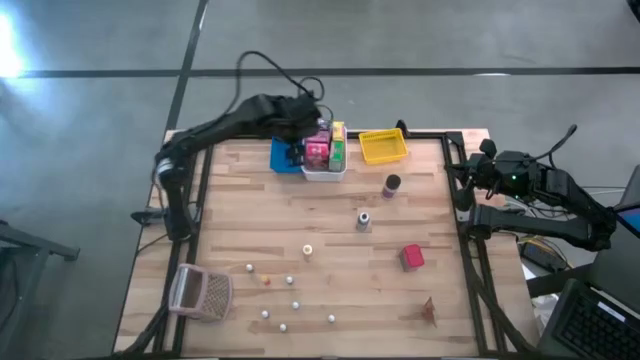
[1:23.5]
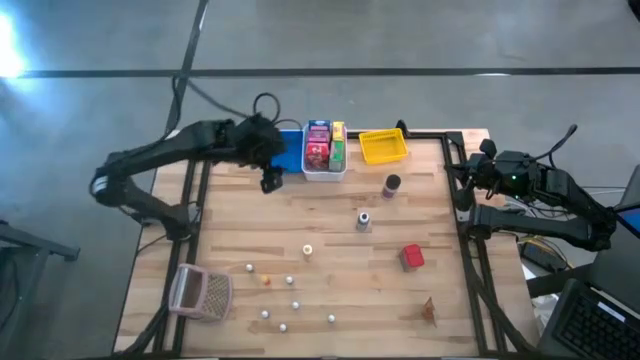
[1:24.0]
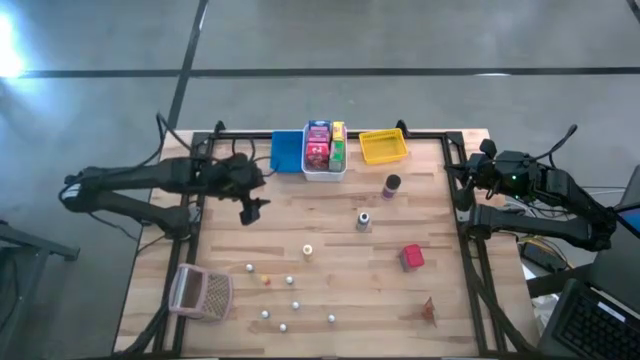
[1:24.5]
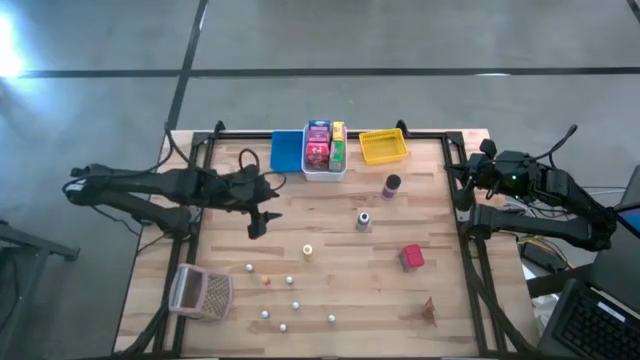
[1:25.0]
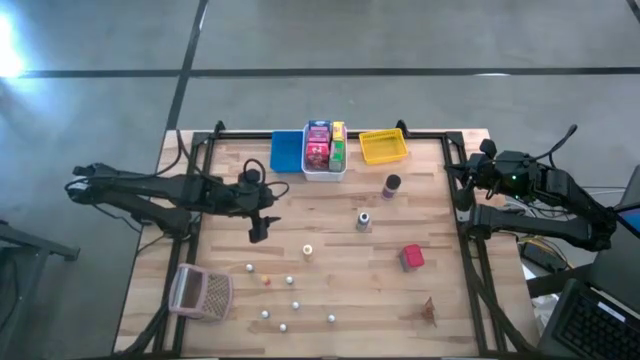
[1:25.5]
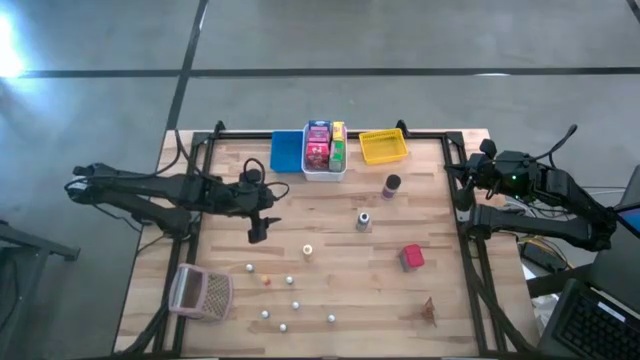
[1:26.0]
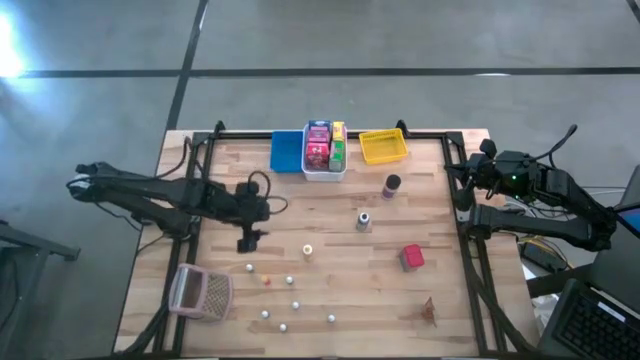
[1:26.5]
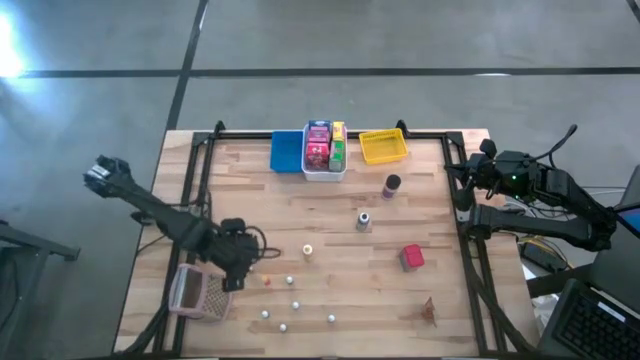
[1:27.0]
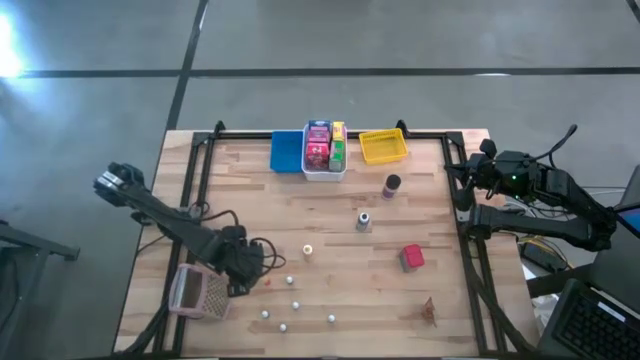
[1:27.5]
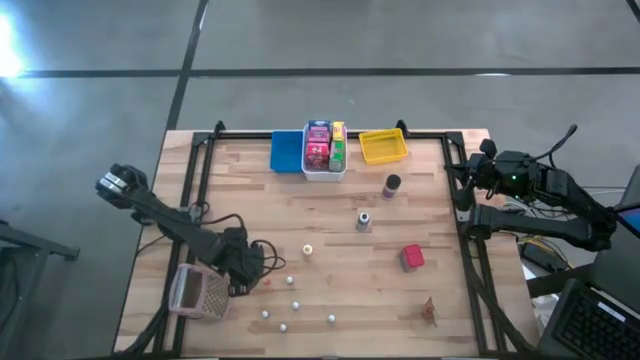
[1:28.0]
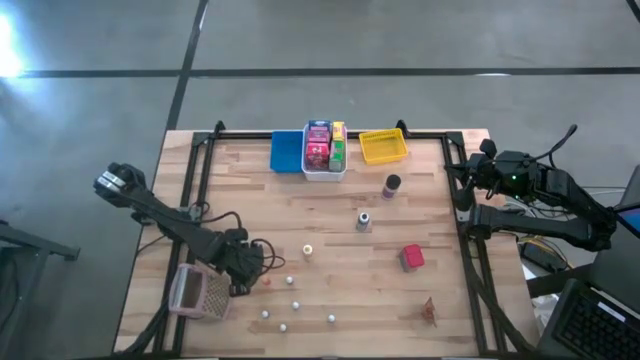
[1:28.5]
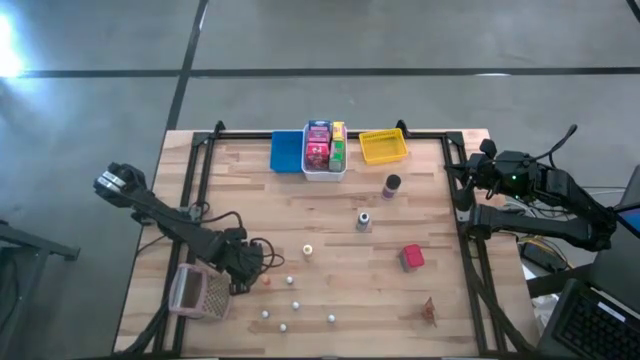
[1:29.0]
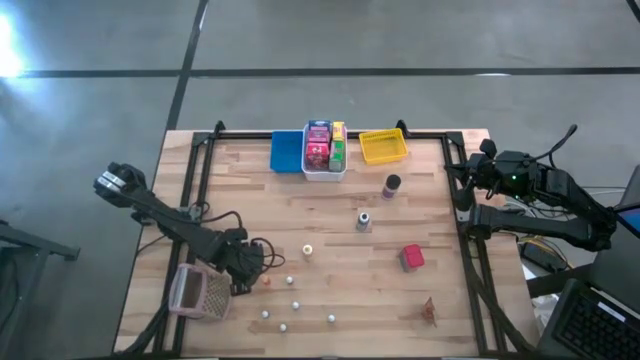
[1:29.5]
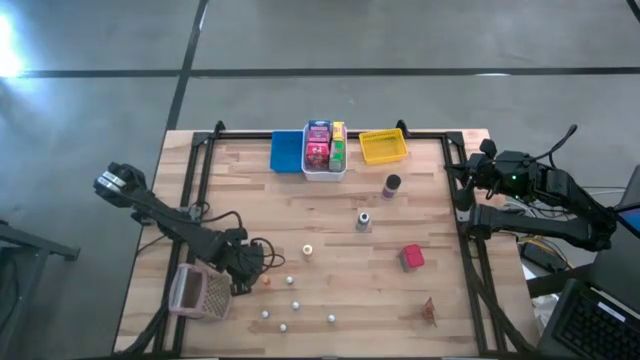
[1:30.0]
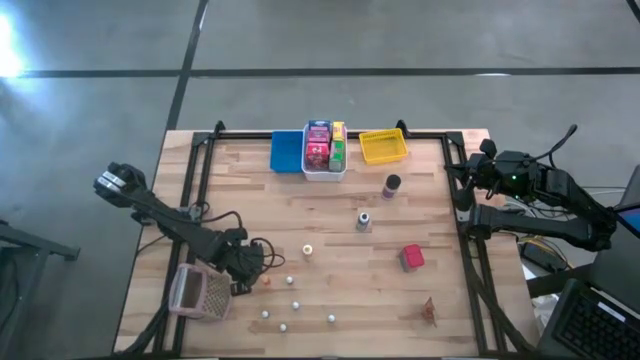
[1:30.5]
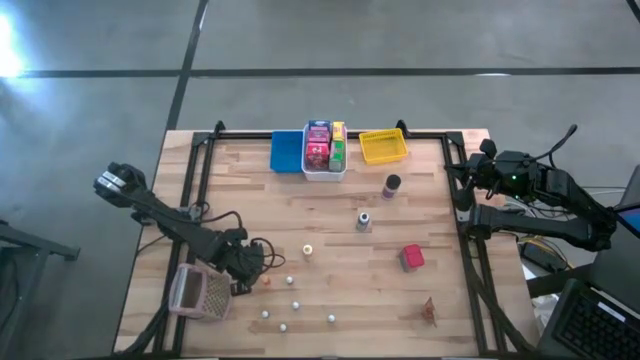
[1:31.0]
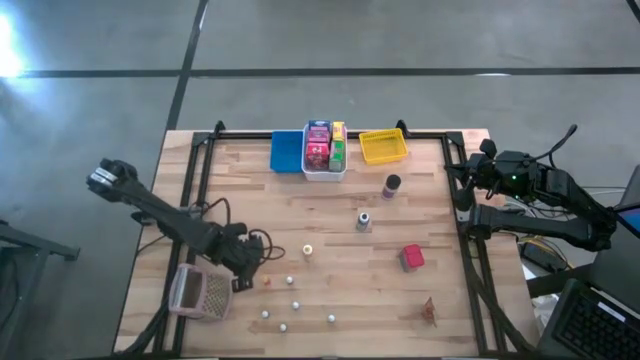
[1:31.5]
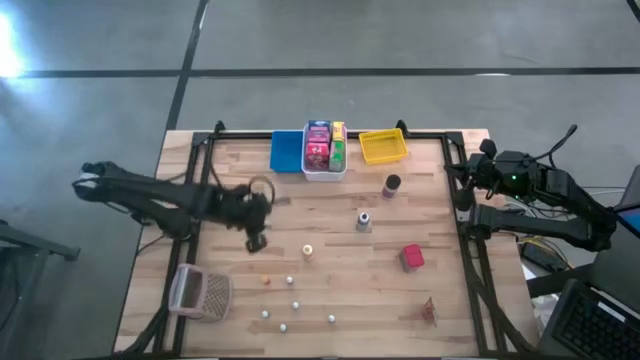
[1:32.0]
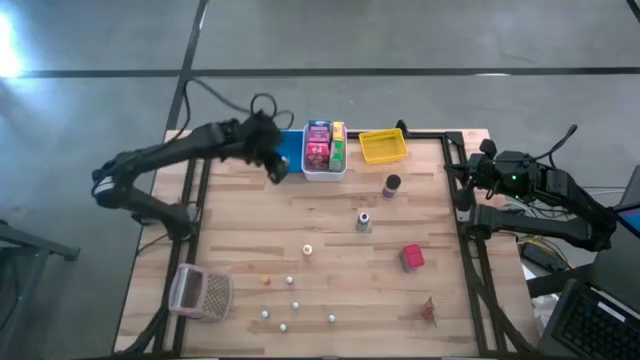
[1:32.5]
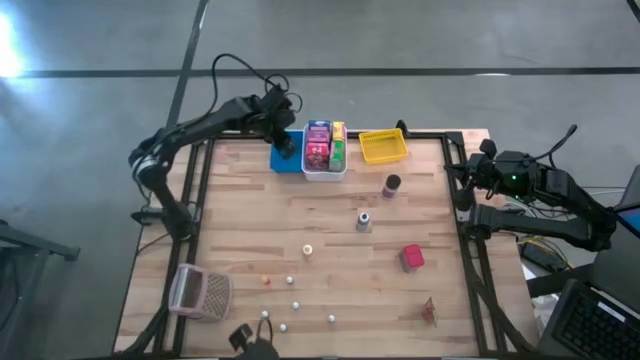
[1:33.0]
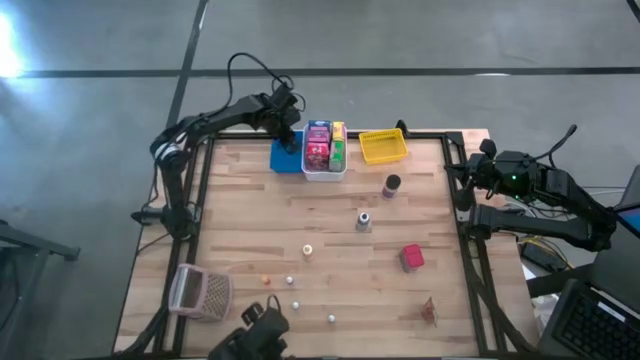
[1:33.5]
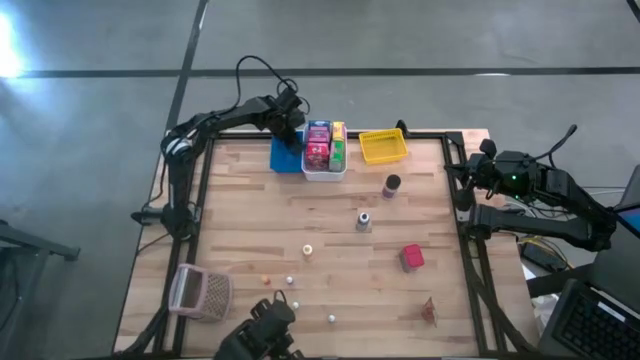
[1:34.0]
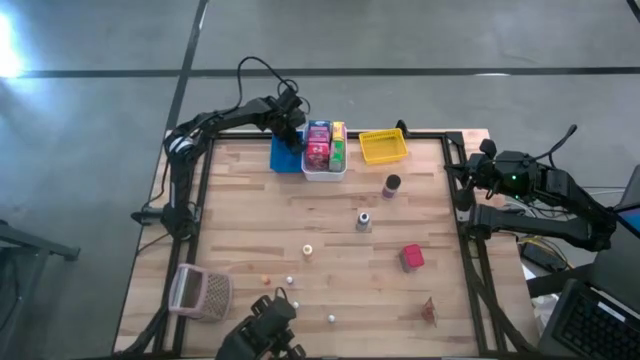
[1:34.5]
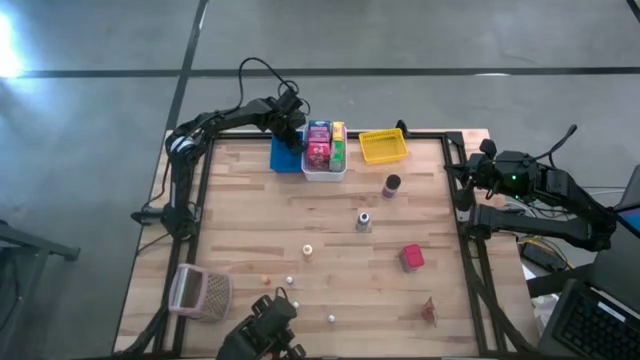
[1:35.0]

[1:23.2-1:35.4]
Task: Pick & Place Kitchen Items
Put the small green food coloring bottle into the blue bin

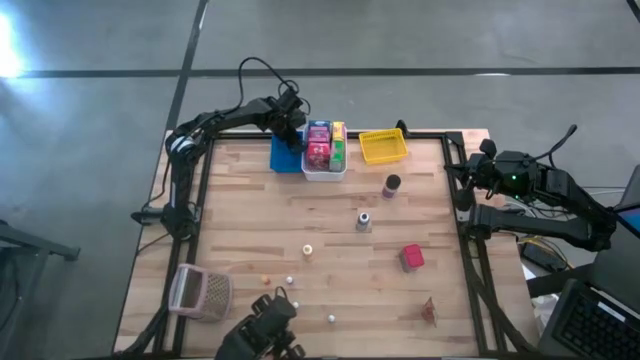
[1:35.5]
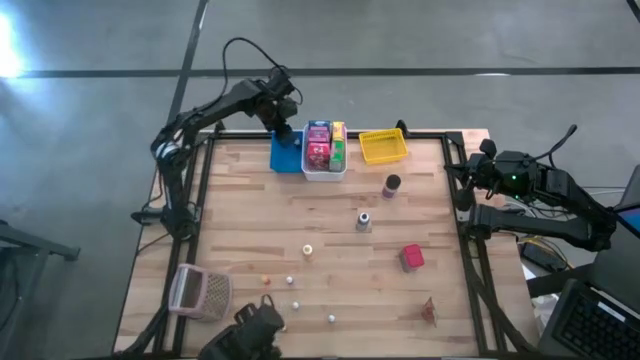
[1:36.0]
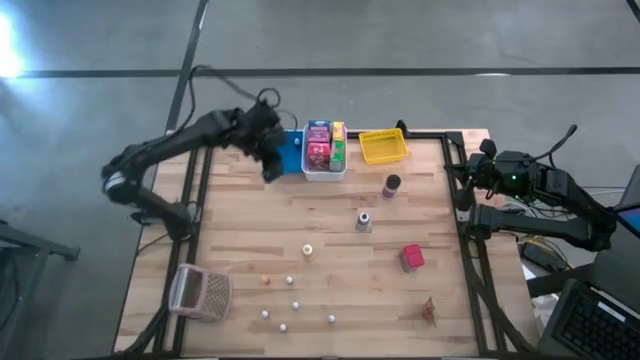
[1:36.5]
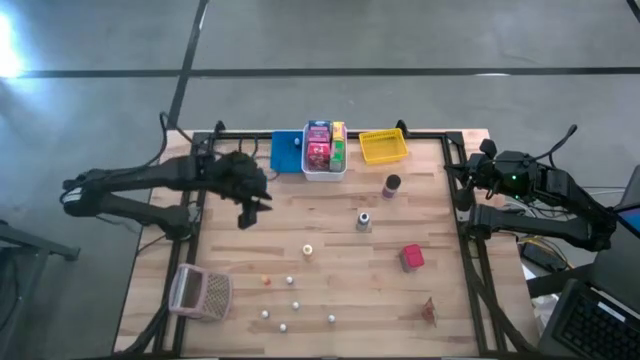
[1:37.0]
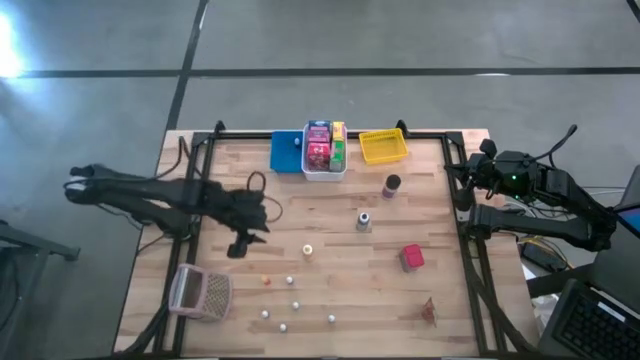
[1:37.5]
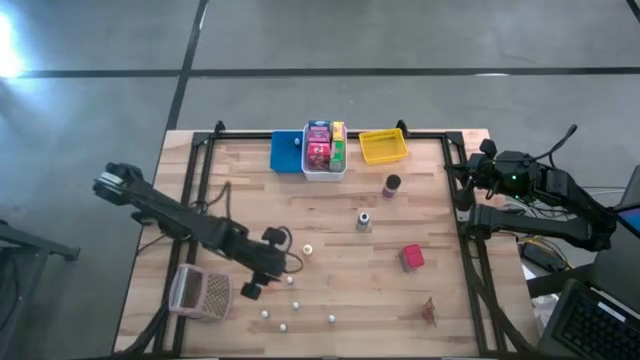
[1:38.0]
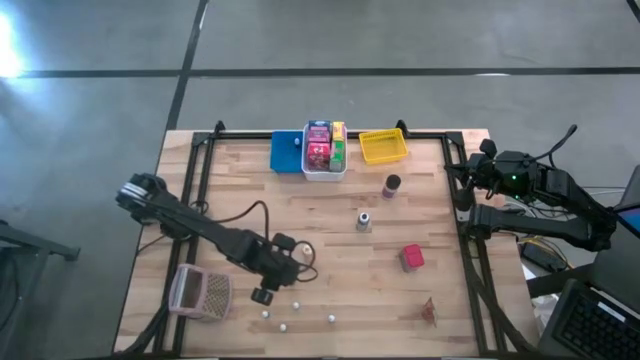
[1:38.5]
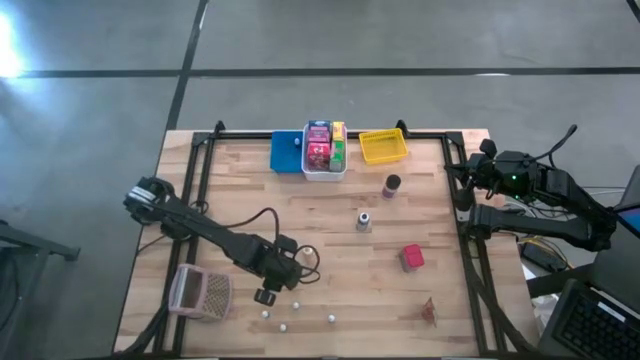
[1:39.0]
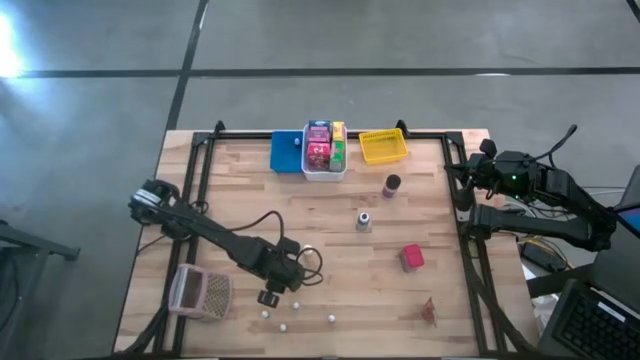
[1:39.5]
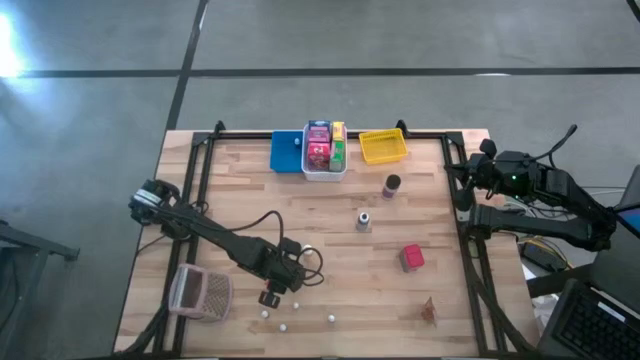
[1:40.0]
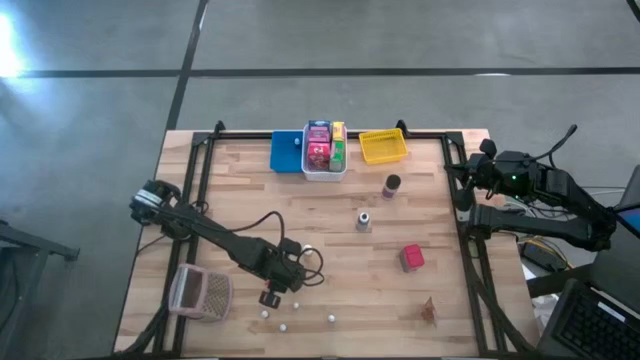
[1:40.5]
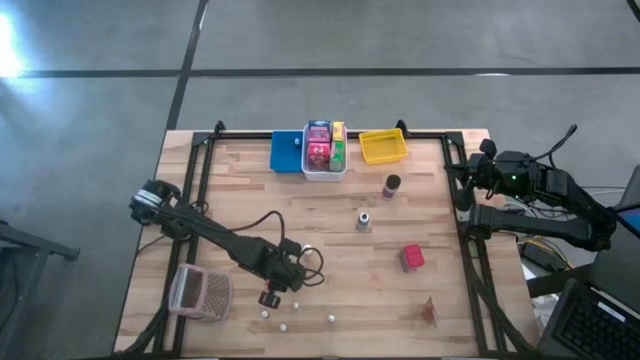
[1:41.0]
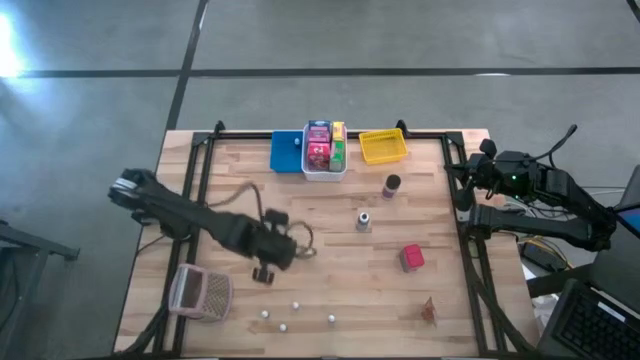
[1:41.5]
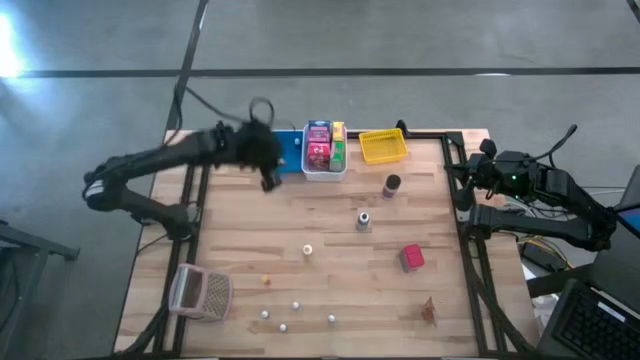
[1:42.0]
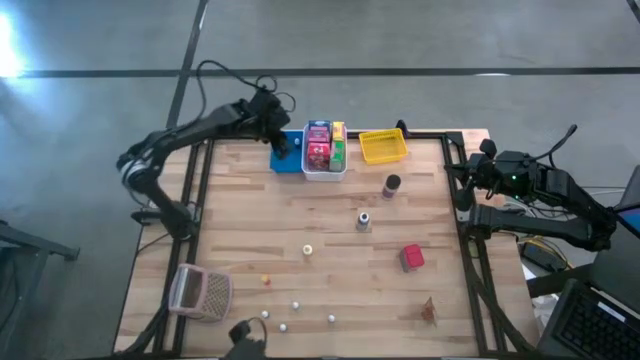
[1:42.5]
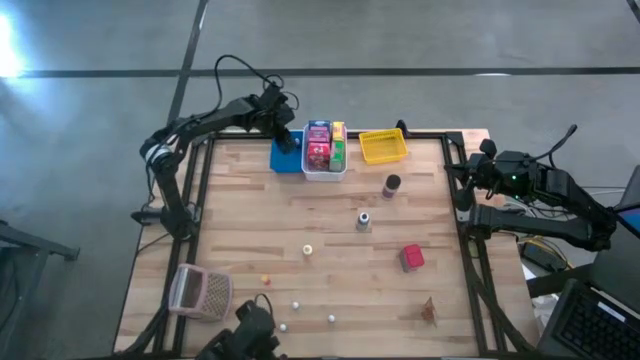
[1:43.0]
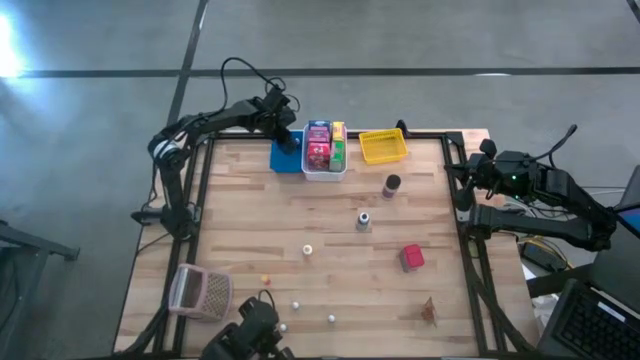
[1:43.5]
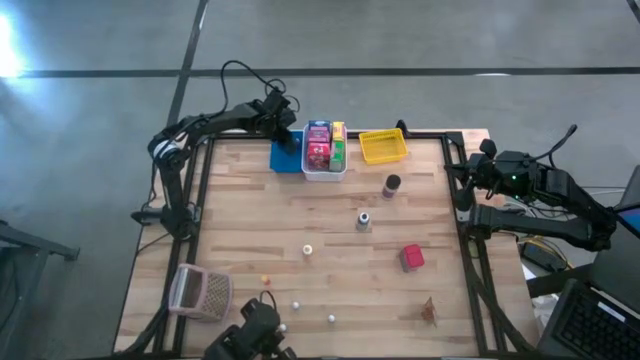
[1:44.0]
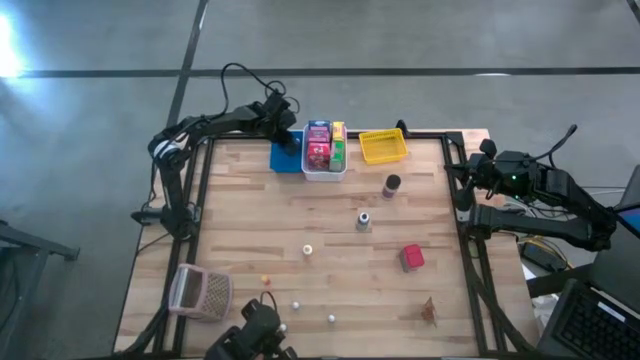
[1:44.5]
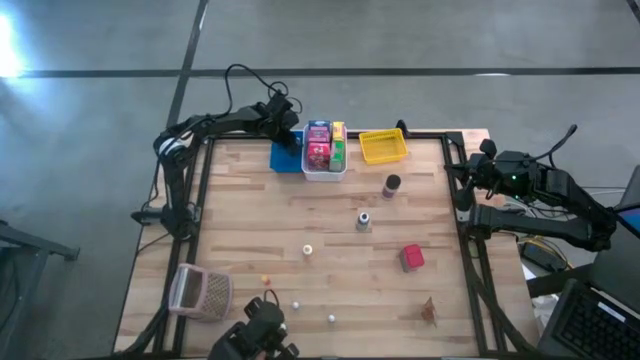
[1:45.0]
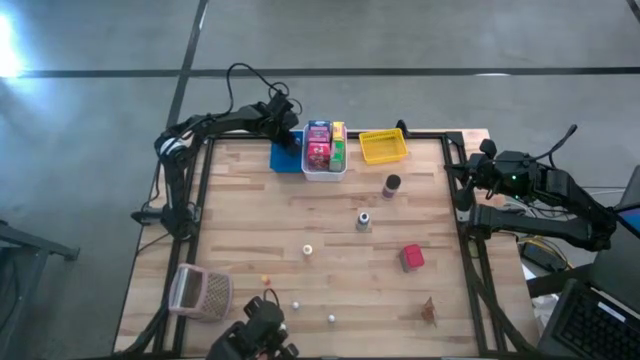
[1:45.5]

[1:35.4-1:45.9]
Put the small orange food coloring bottle into the blue bin
